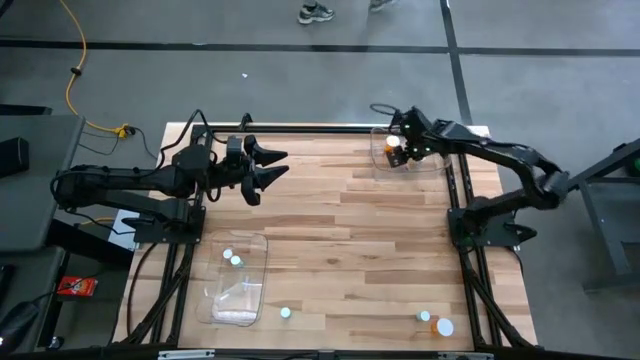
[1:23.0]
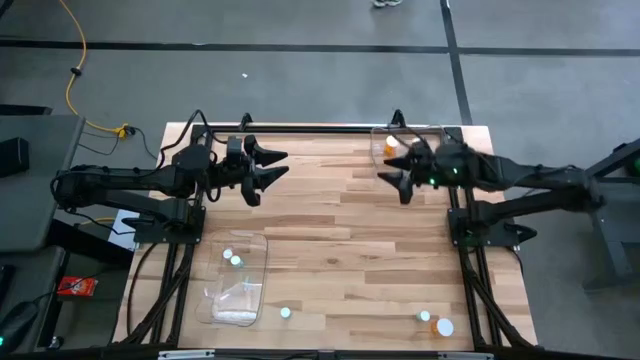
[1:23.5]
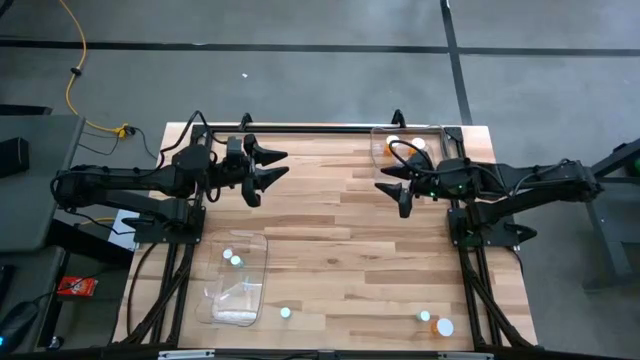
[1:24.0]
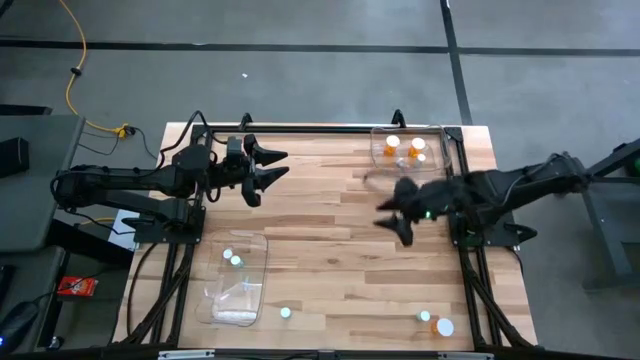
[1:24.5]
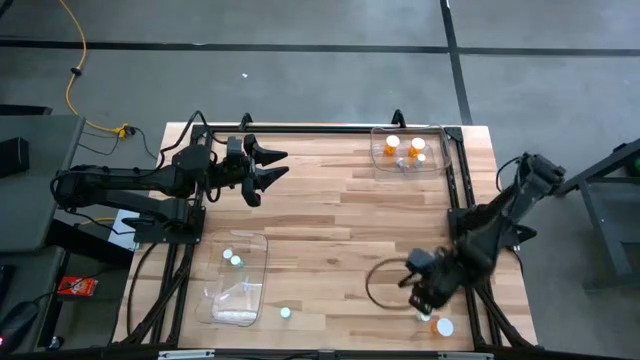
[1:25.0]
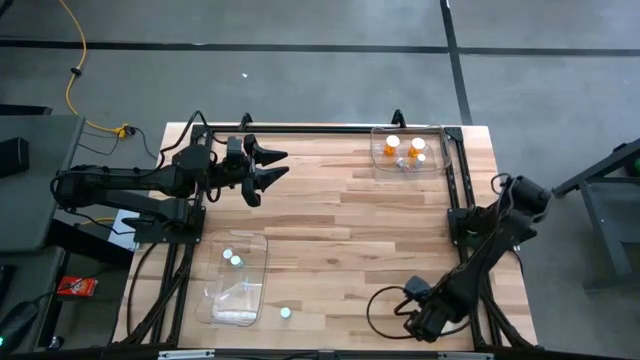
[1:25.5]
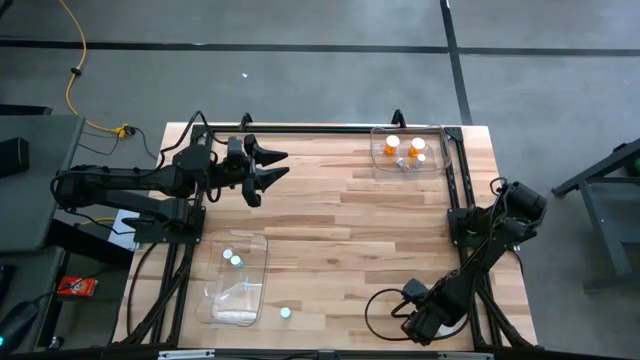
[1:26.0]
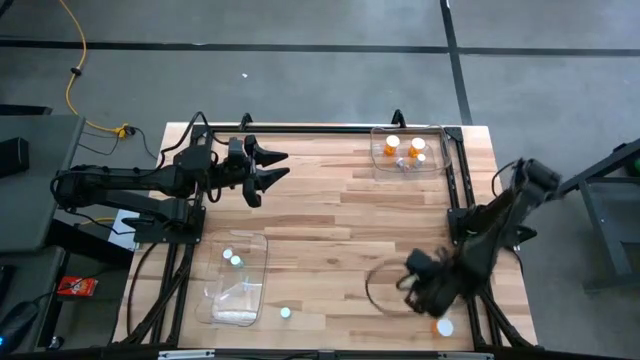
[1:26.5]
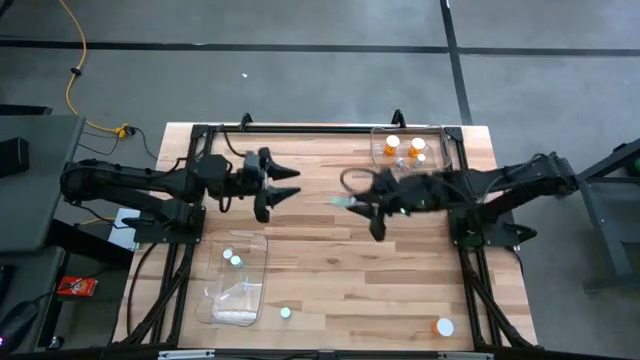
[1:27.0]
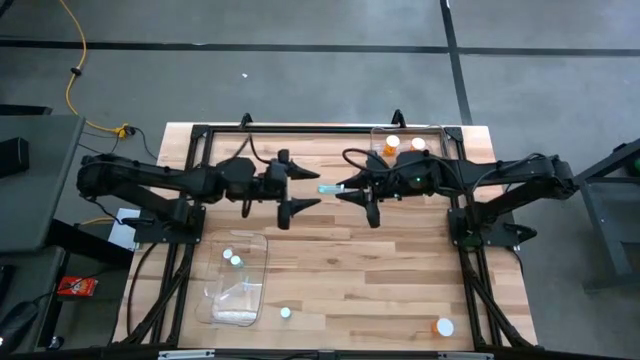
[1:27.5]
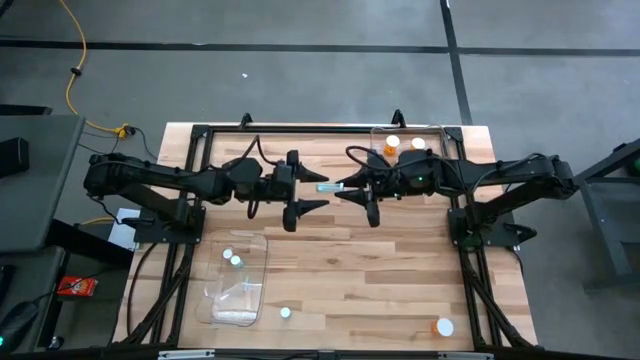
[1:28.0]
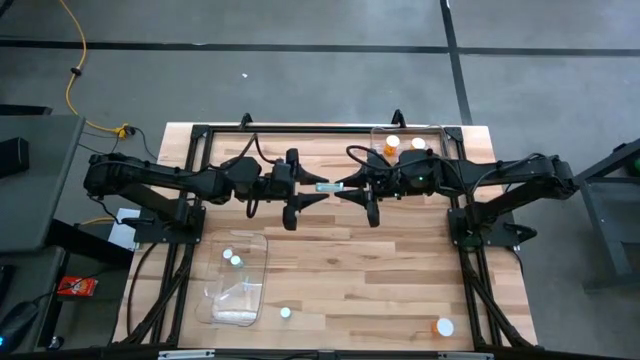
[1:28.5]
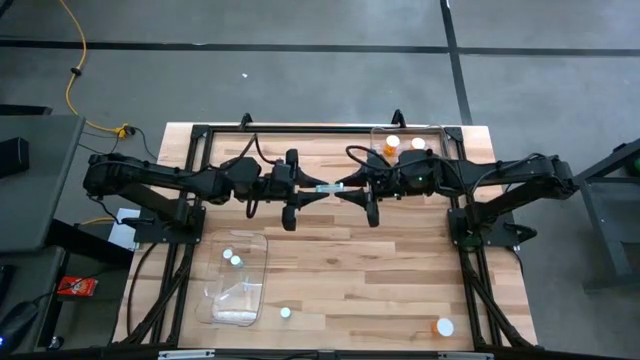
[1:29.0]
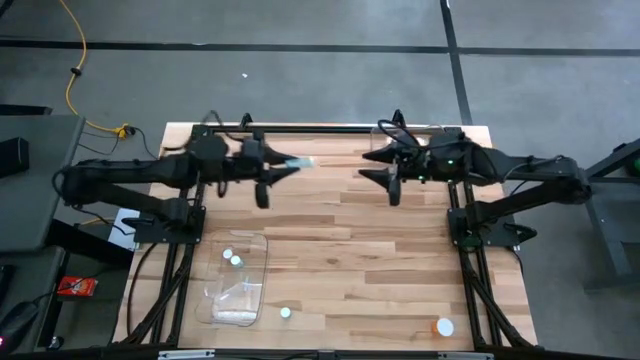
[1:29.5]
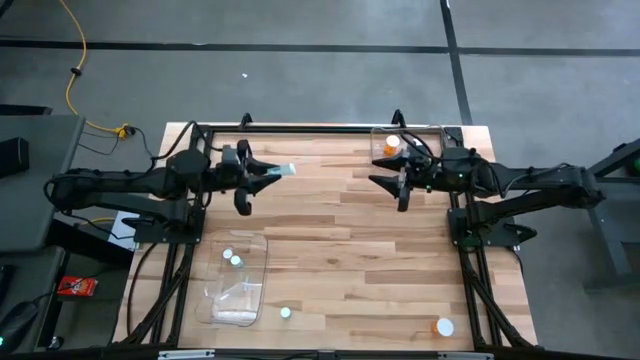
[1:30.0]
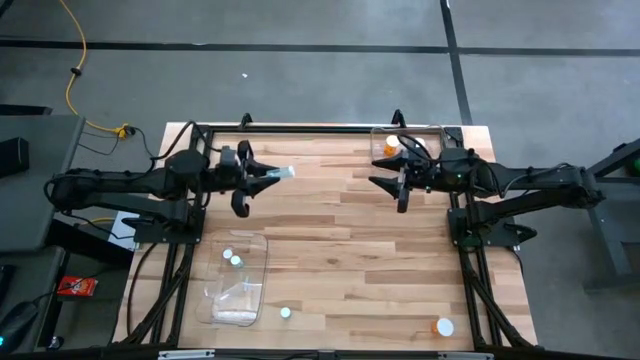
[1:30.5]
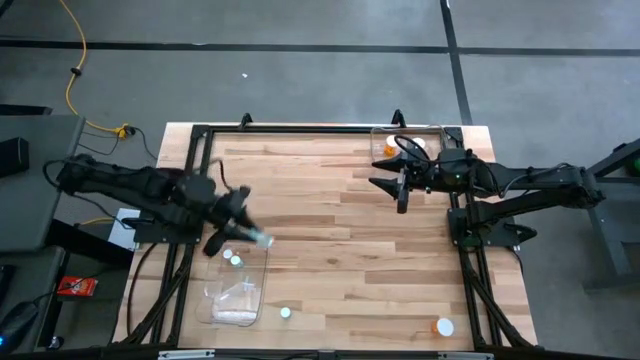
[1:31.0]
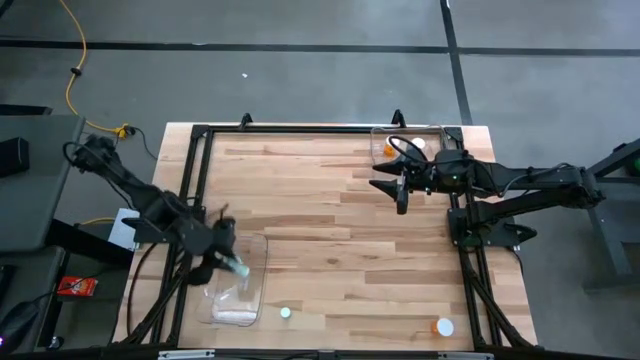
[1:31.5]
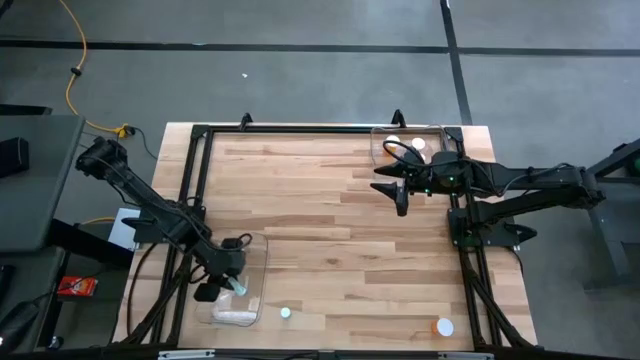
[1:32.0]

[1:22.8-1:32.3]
Task: Pick and place medicine bottles into bin by pill shape (circle, oval)
Put the green tablet bottle into the bottom transparent bin

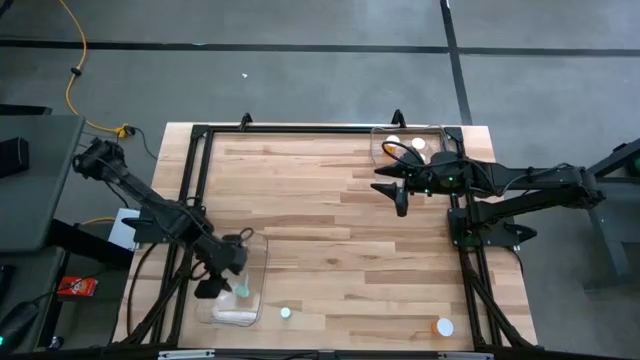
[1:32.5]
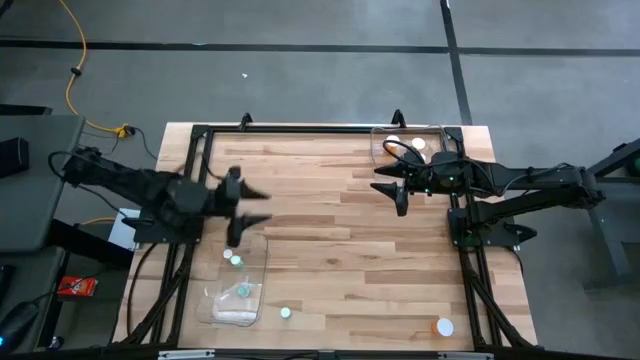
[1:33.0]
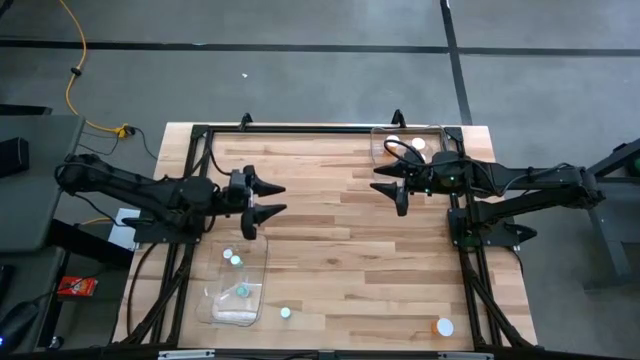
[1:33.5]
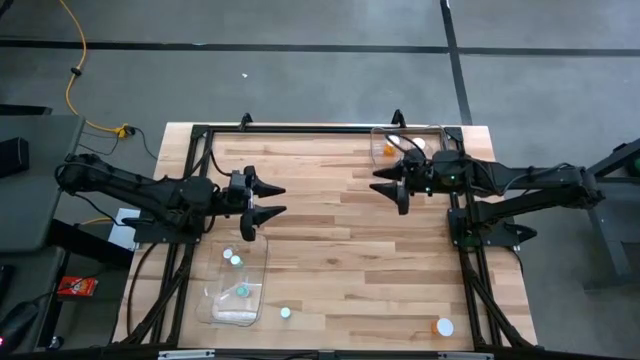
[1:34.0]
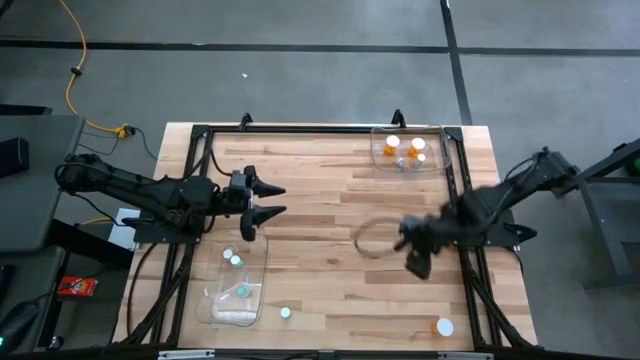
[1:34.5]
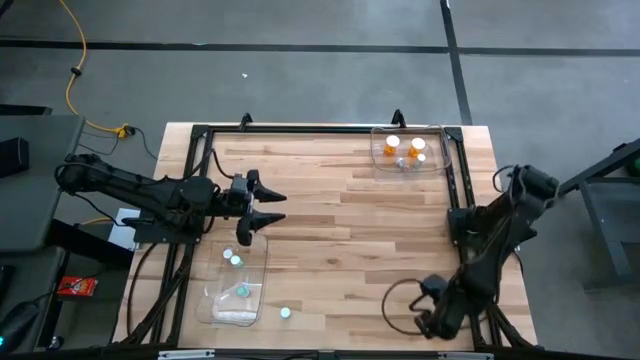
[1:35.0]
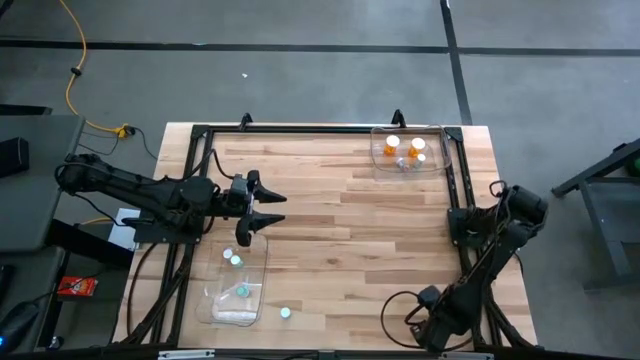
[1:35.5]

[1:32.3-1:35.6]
Put the large orange capsule bottle into the top transparent bin

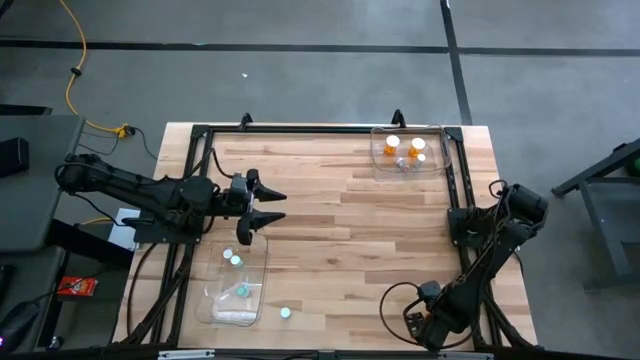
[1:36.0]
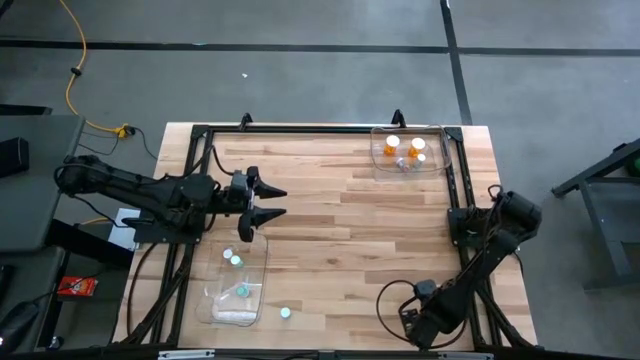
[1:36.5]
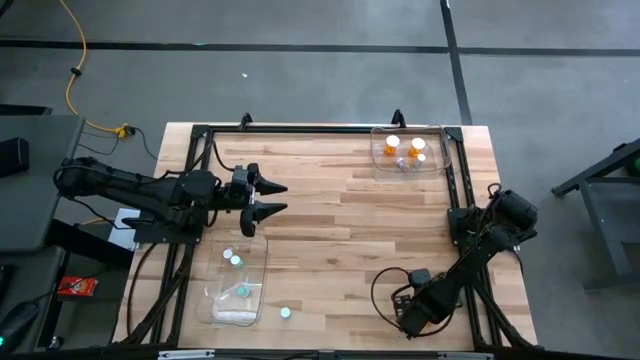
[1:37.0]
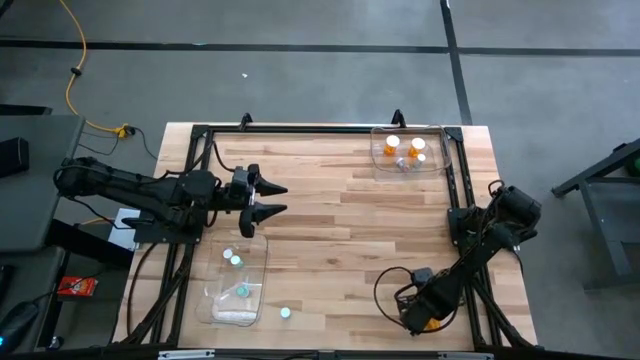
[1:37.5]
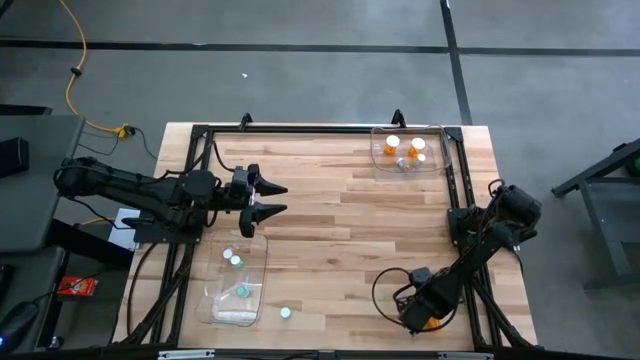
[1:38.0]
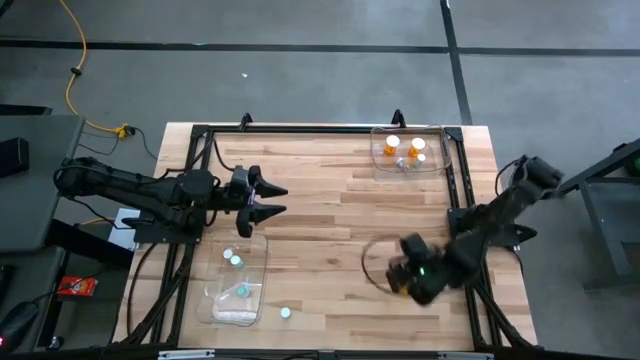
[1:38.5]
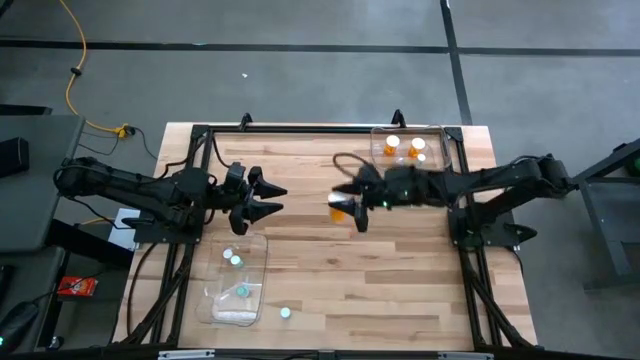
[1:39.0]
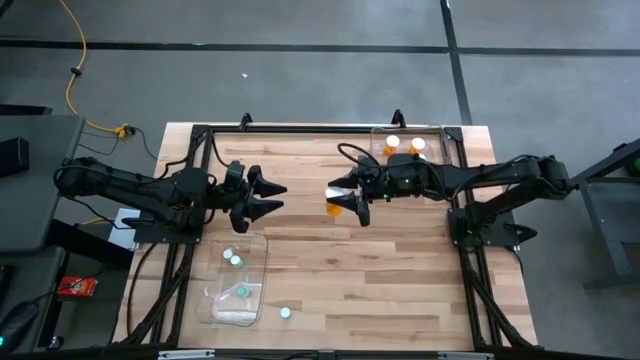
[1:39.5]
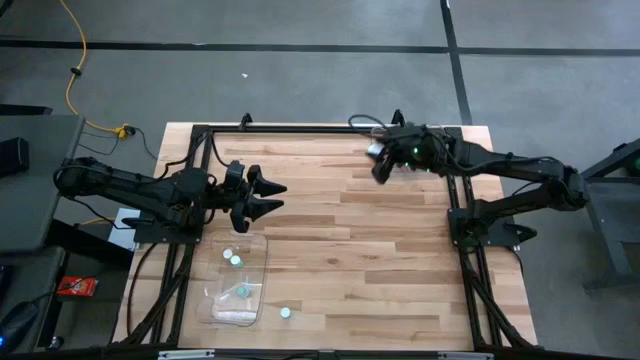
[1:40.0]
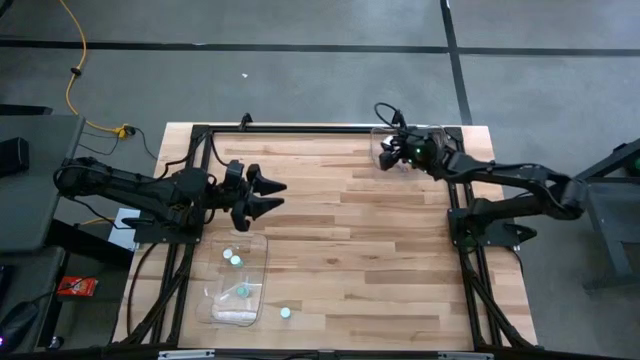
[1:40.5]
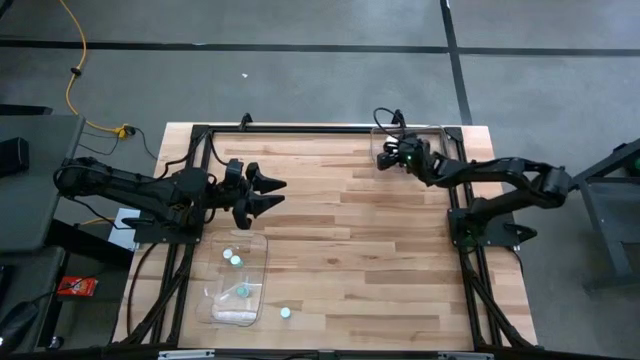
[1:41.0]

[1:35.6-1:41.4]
Put the large orange capsule bottle into the top transparent bin

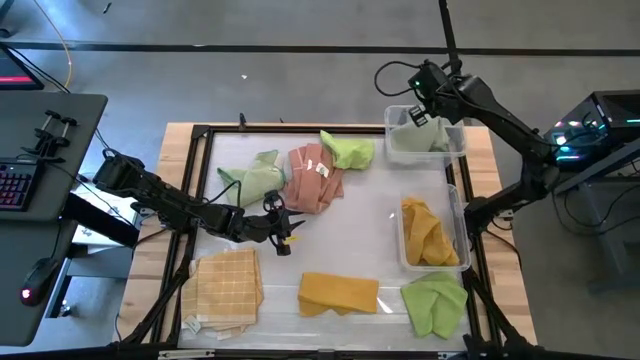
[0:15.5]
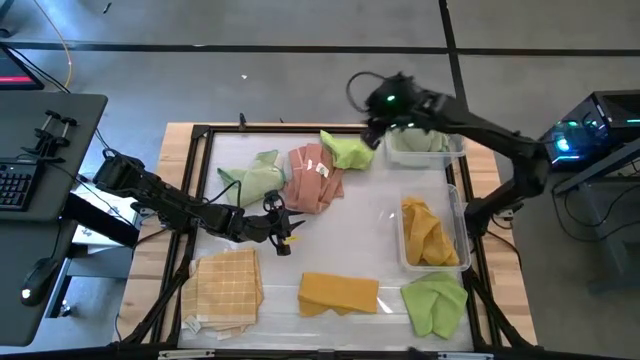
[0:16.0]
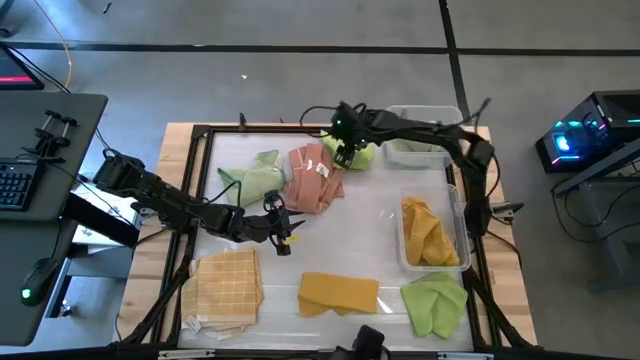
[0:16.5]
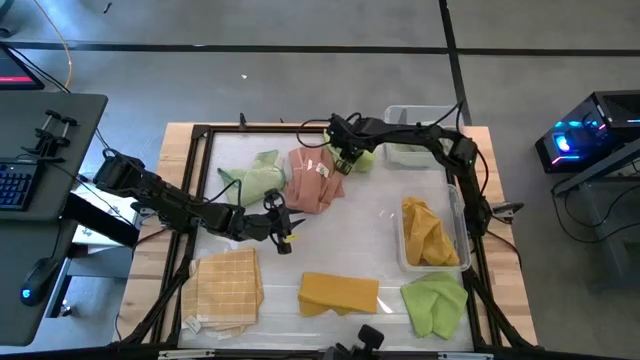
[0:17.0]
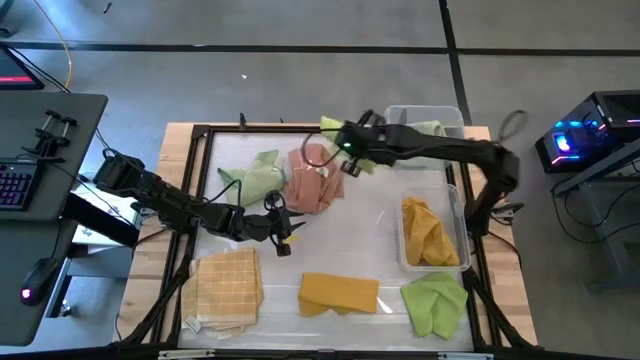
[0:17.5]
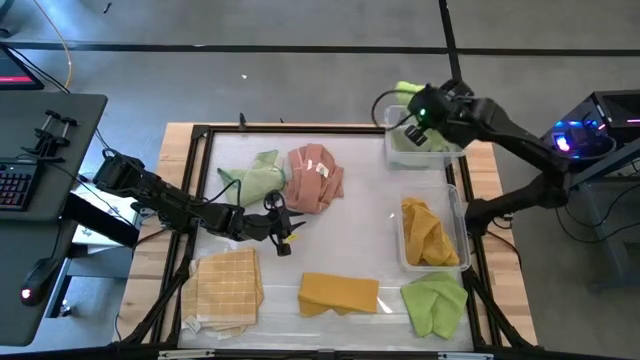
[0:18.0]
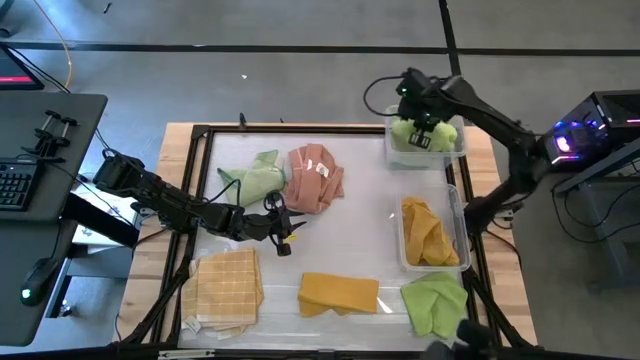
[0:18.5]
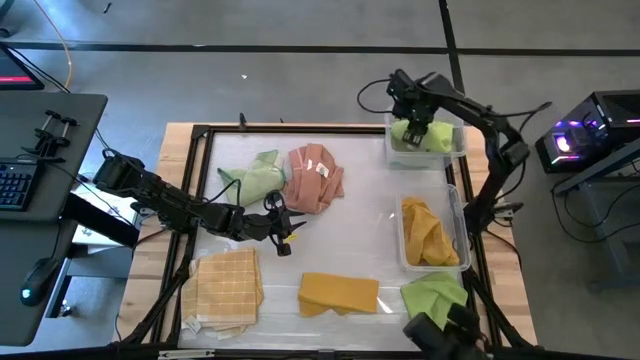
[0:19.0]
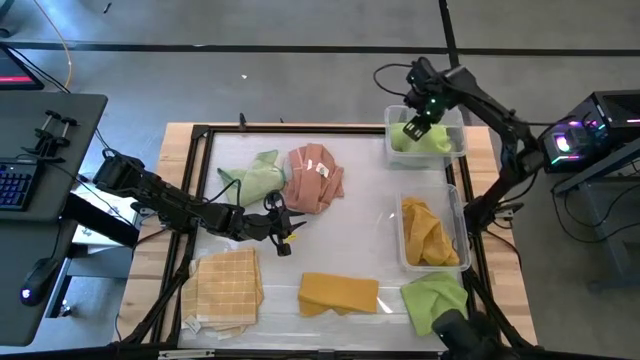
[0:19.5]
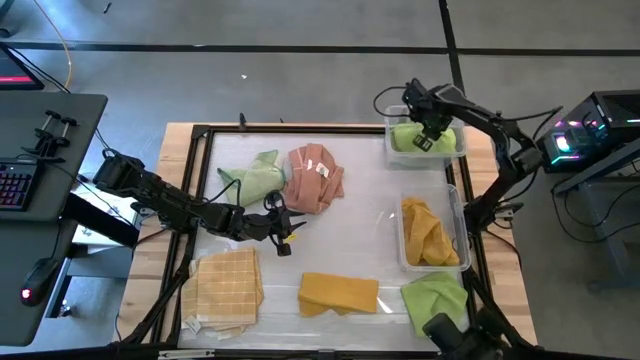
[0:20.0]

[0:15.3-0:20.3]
Task: Sort towels by color in basket
Put the top light green microfiber towel into the top transparent bin
